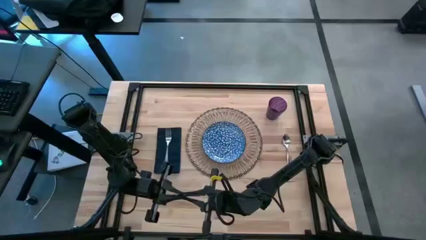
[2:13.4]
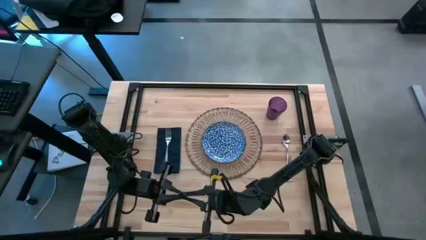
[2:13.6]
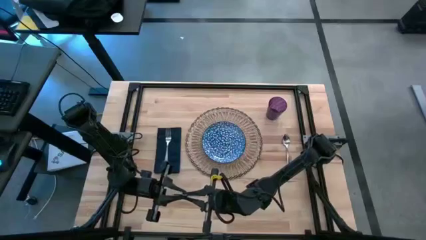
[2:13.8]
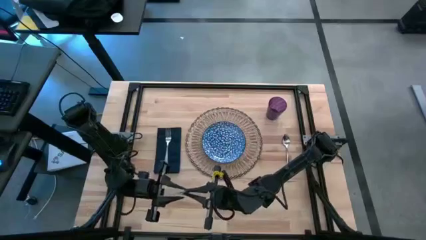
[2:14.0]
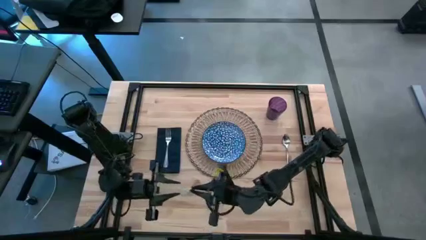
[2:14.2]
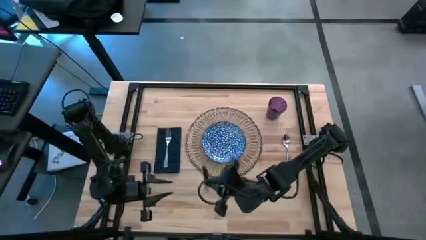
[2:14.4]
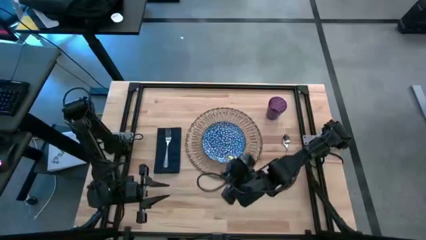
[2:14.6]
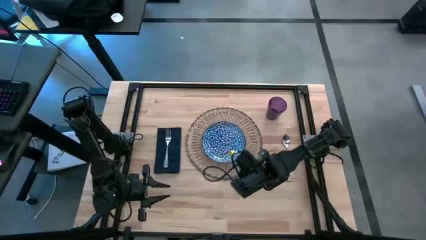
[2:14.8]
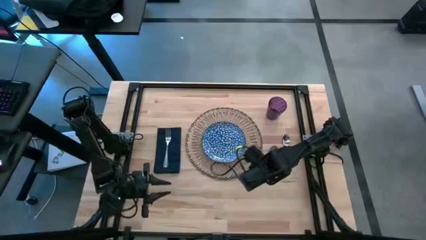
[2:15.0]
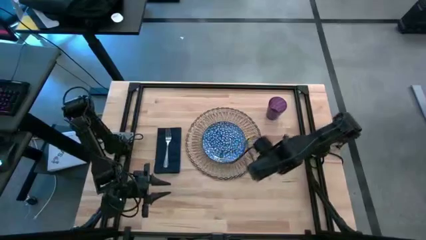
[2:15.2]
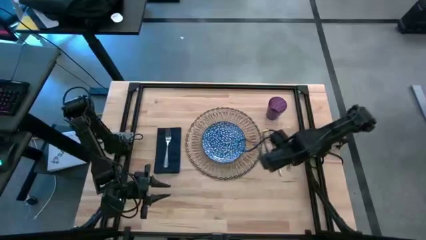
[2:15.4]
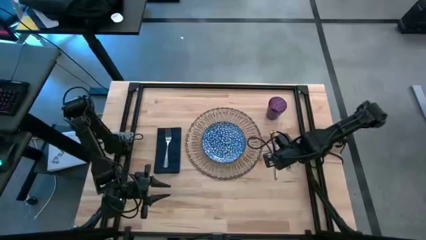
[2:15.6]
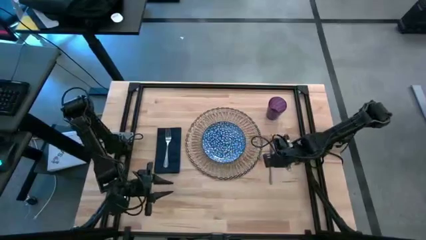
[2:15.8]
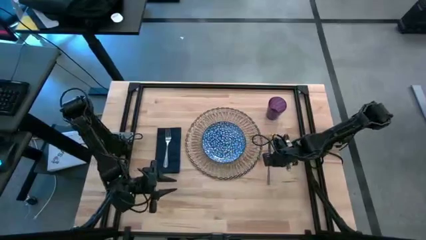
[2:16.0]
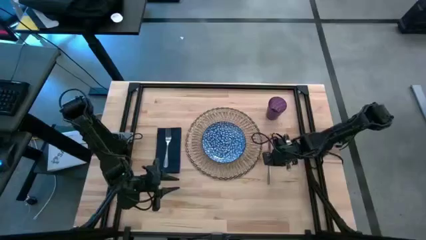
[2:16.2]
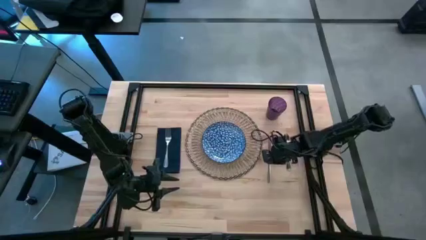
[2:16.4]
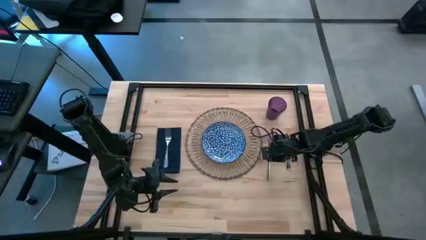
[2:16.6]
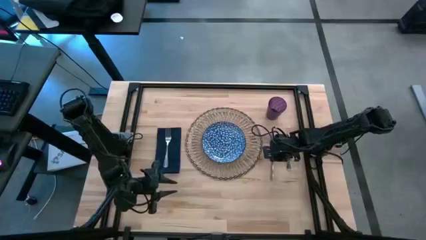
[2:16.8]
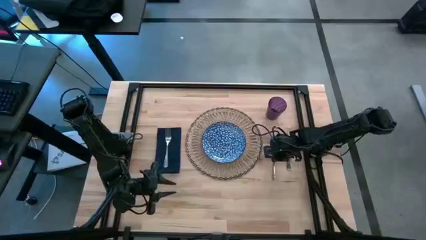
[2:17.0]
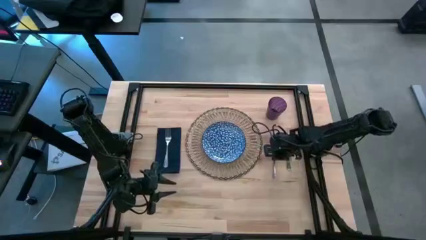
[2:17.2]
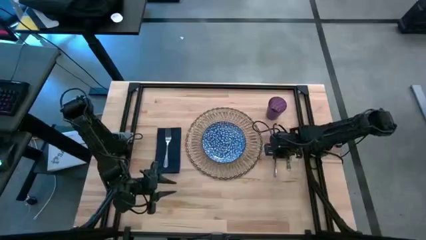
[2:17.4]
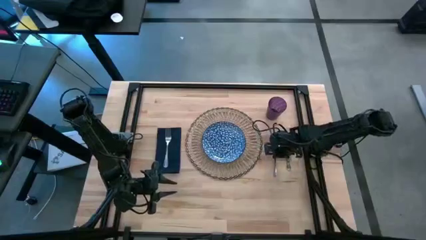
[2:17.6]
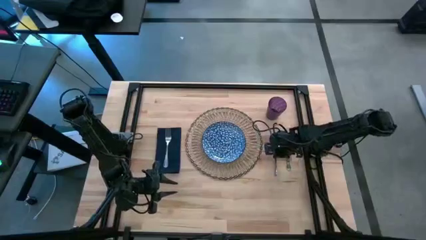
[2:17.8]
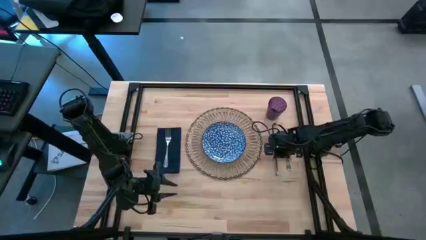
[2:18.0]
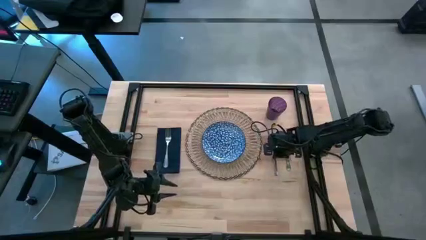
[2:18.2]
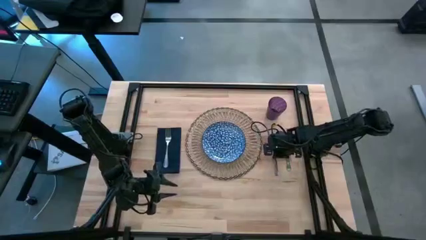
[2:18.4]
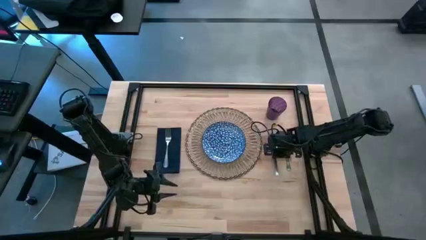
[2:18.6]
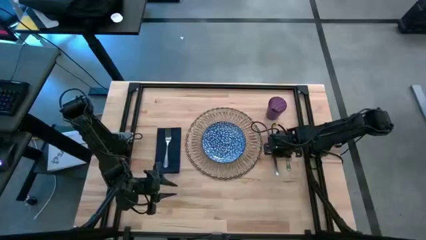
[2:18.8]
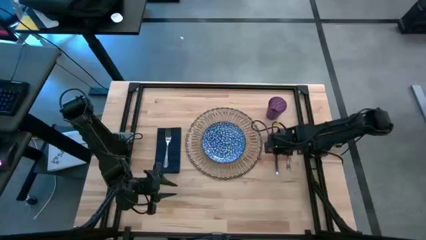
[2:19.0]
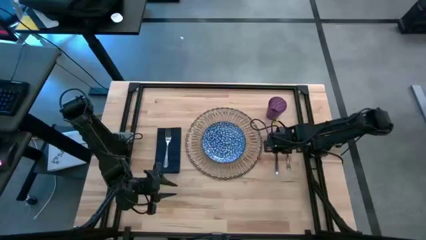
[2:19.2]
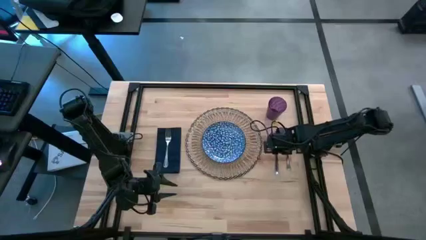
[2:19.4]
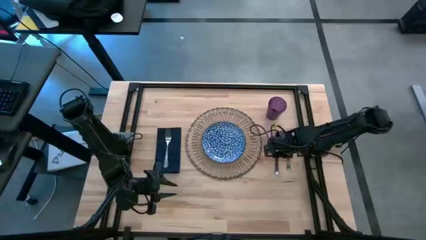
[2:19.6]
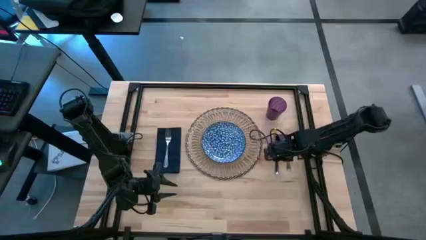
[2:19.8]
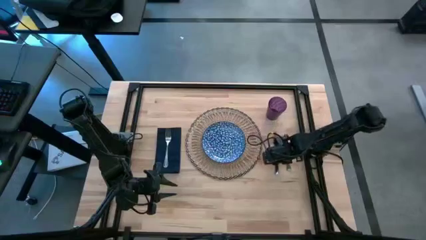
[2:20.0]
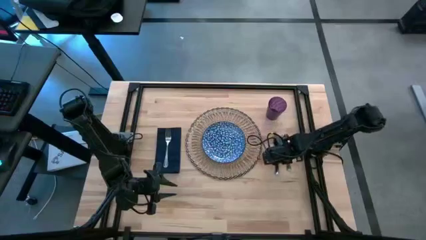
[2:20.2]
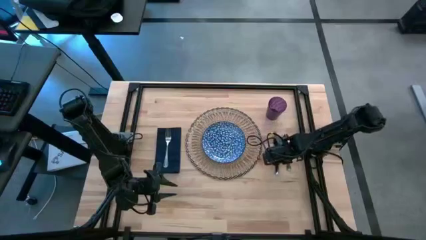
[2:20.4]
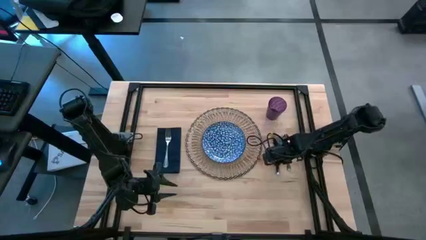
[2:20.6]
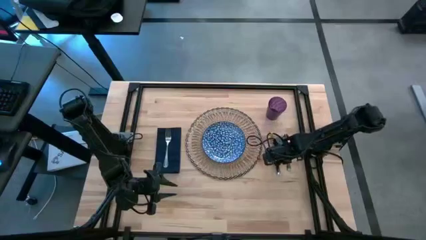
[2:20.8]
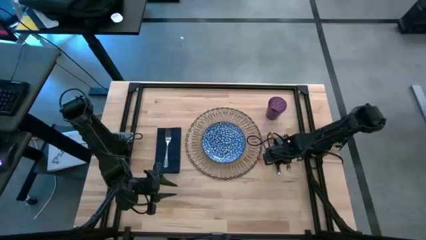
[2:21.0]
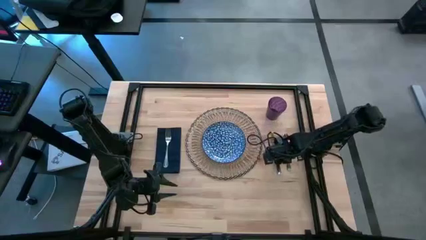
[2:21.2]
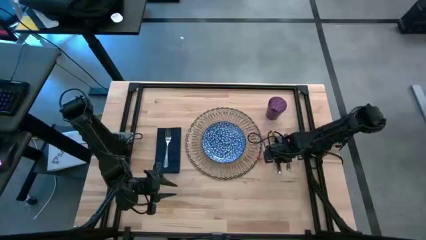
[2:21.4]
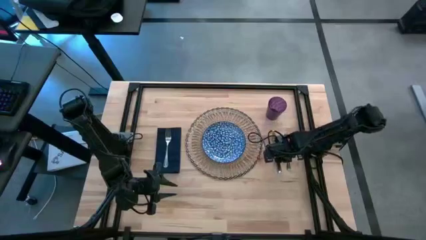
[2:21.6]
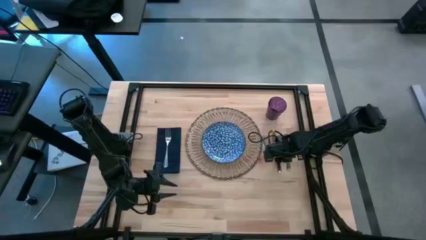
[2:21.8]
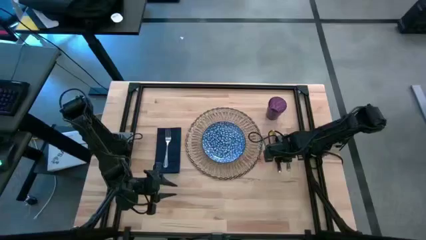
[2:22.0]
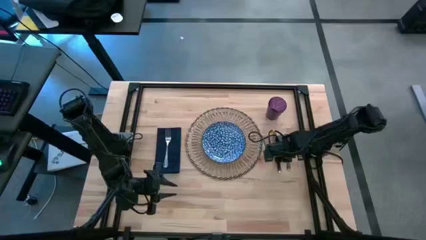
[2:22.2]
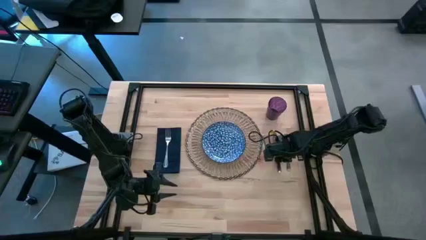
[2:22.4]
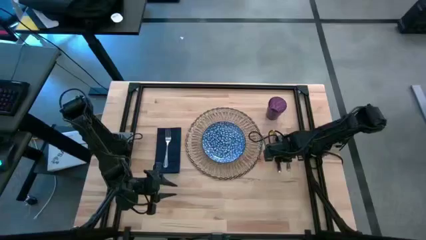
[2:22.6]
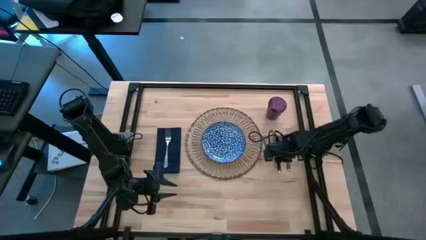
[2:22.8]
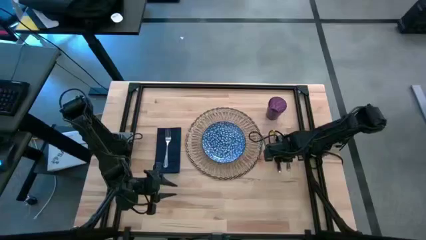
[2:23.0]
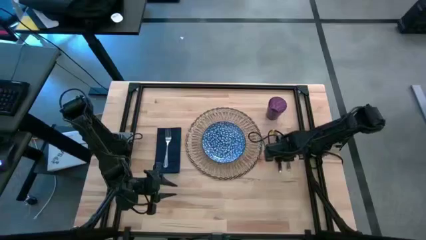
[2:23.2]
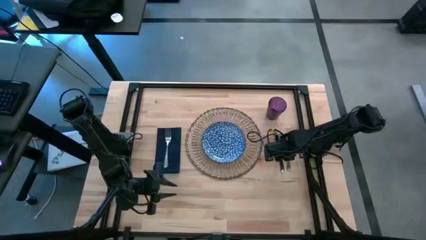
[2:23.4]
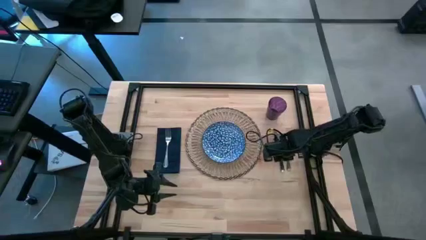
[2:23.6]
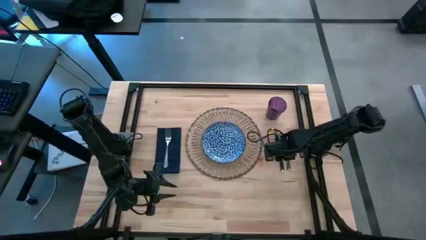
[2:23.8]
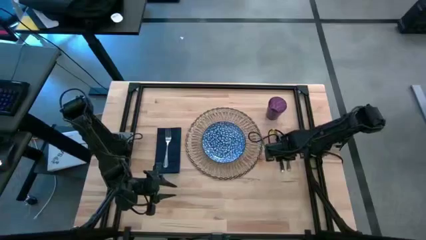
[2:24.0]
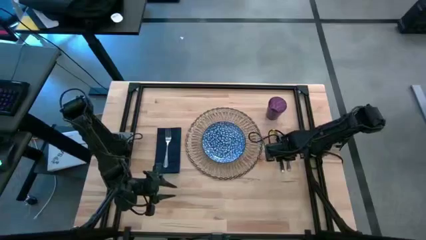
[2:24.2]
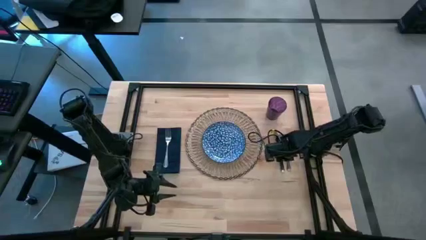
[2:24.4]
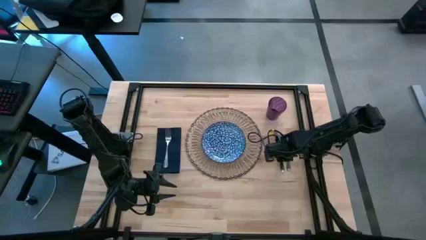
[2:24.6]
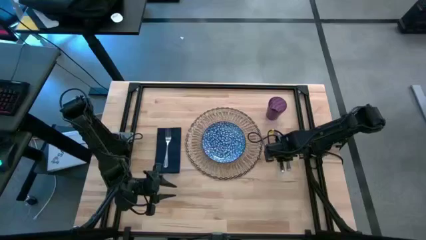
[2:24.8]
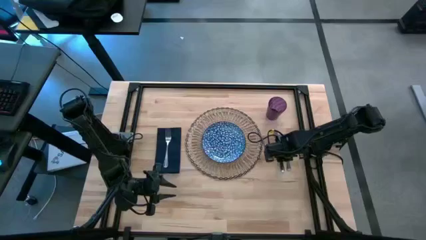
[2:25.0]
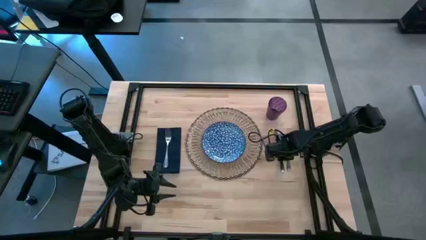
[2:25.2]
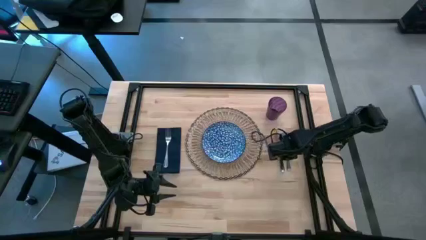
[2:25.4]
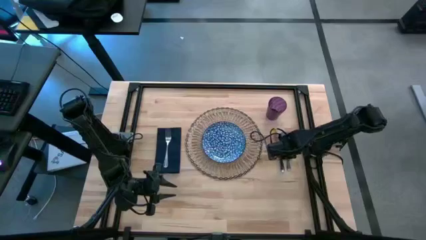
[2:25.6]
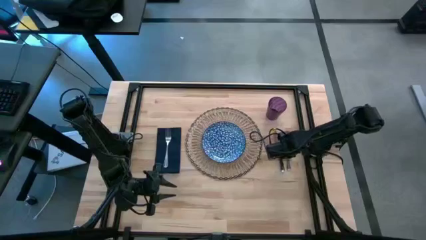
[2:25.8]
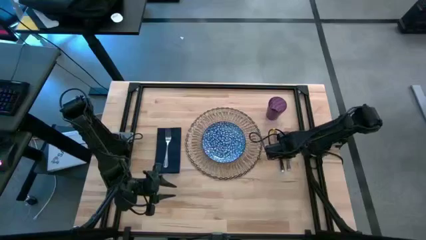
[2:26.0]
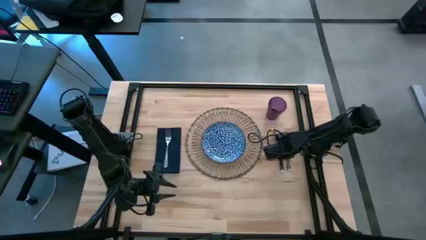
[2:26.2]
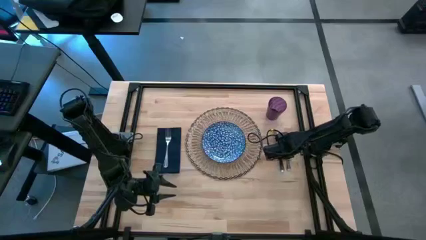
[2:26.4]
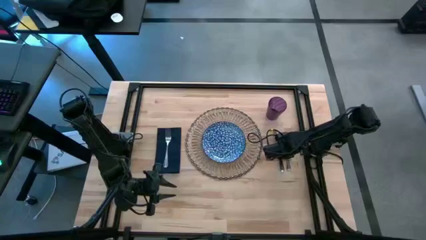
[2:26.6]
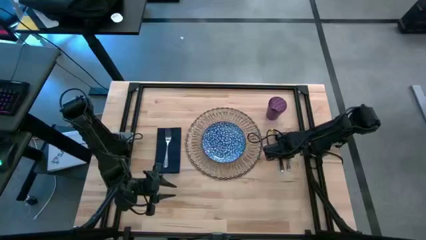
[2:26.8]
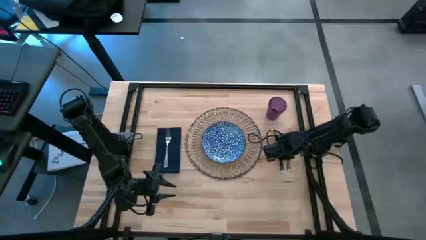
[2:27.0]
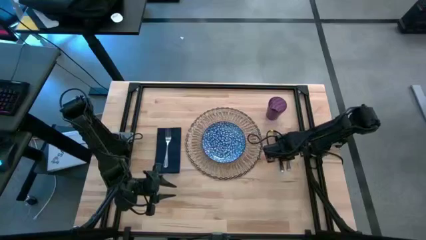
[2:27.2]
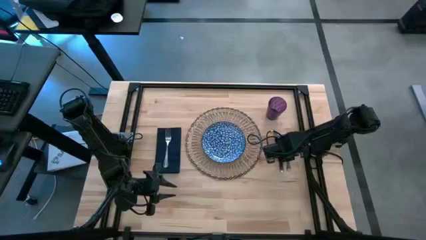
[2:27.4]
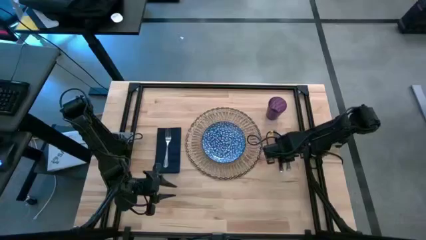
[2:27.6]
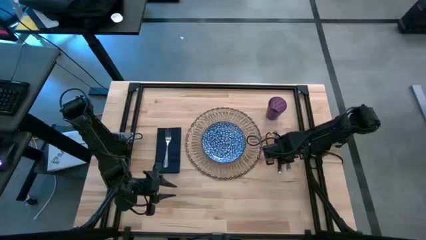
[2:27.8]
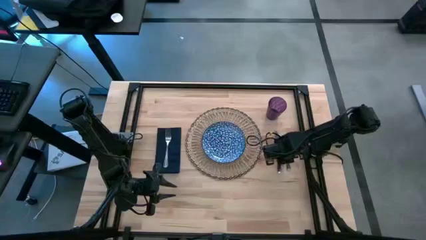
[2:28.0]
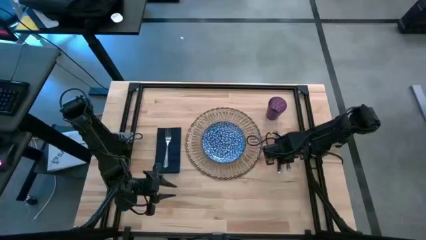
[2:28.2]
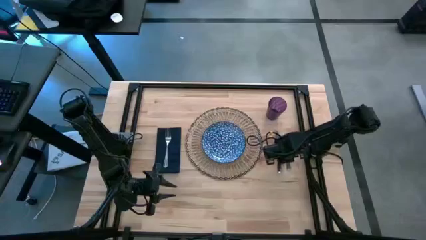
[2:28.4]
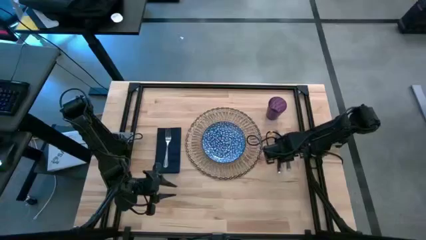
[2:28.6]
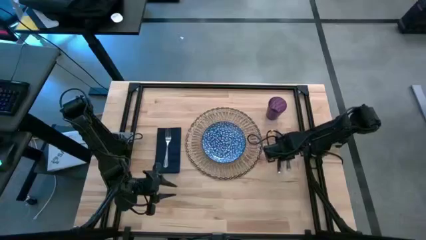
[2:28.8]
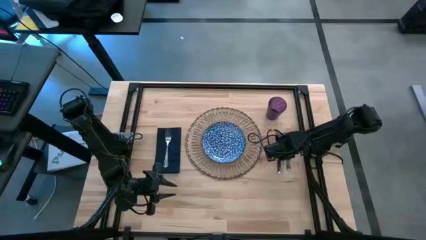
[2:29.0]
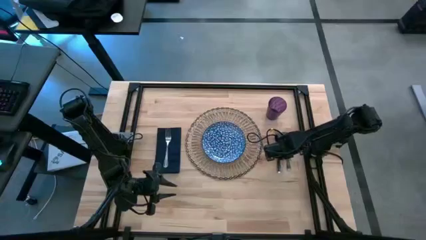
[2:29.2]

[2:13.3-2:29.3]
Task: Set table place
Put the table knife to the left of the silver spoon

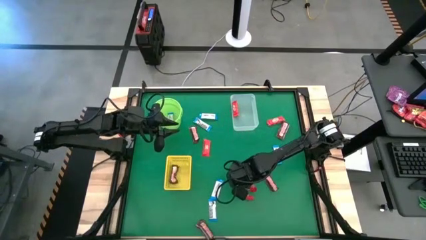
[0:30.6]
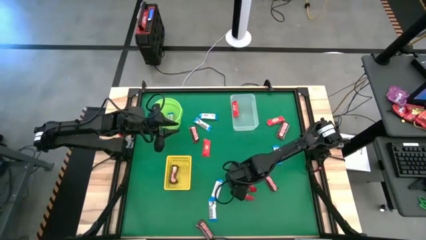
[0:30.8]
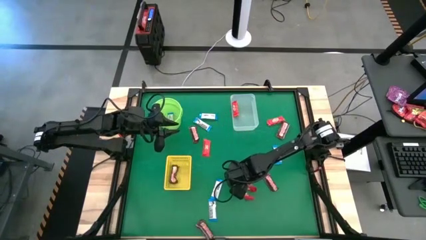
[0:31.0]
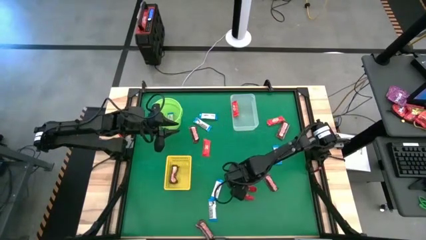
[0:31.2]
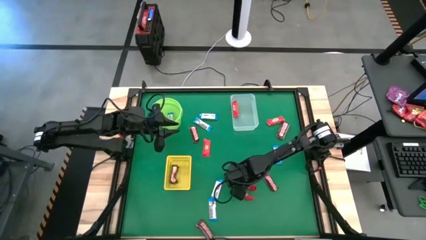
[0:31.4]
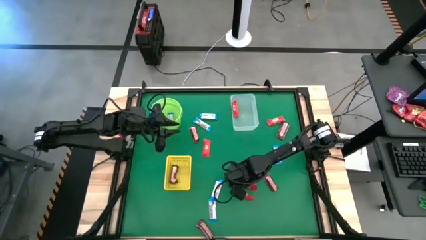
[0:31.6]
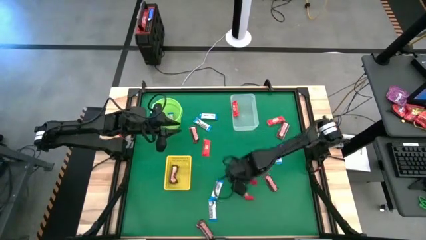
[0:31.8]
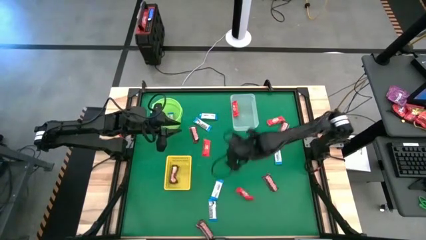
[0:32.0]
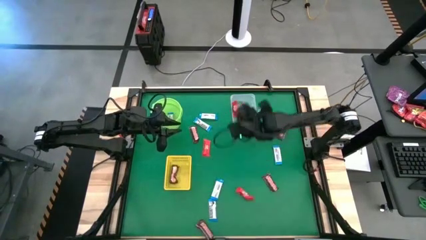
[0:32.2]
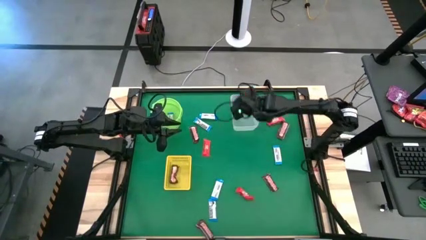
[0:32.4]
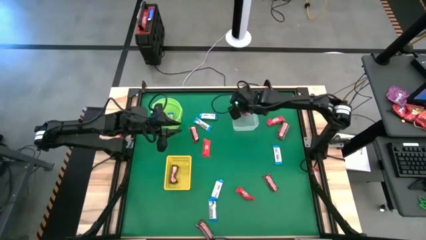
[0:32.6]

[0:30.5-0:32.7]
Task: Sort candy by brand, put in halloween buckets
Put the red chocolate into the transparent bin
